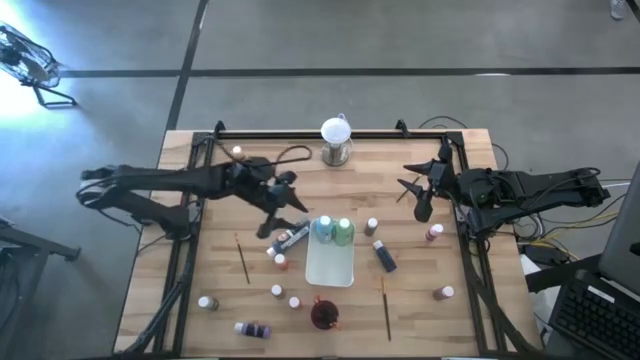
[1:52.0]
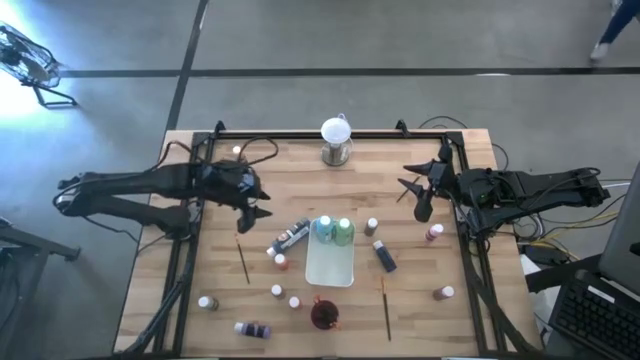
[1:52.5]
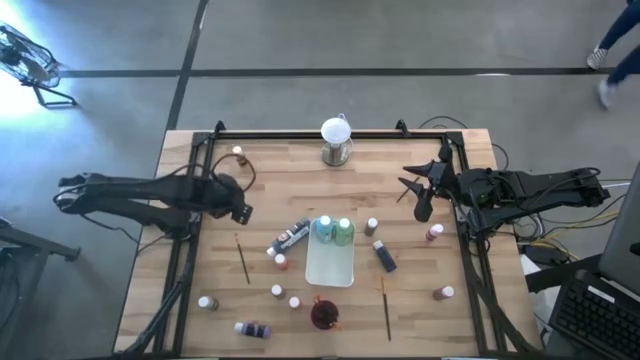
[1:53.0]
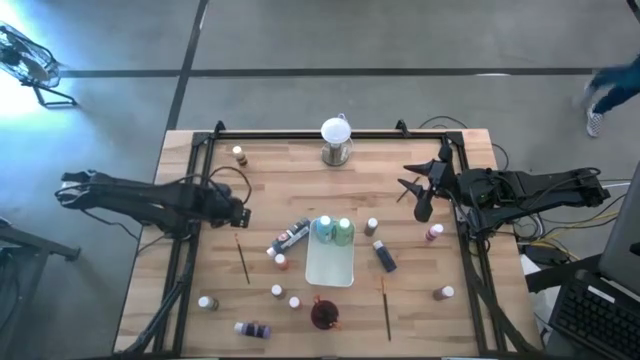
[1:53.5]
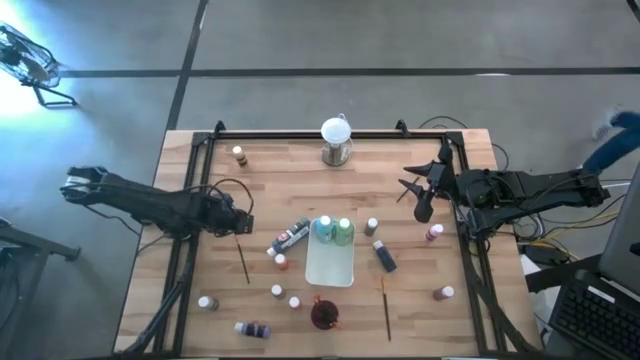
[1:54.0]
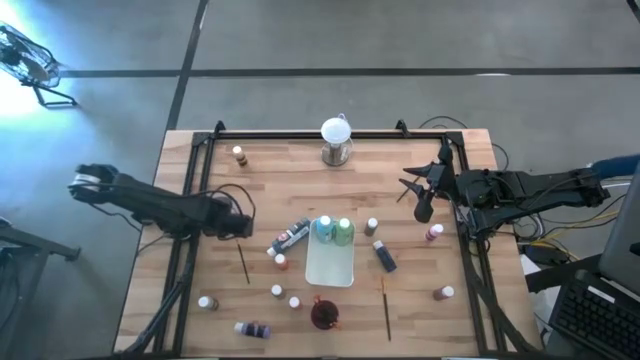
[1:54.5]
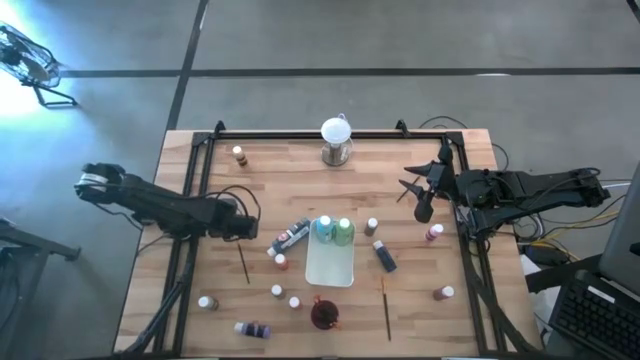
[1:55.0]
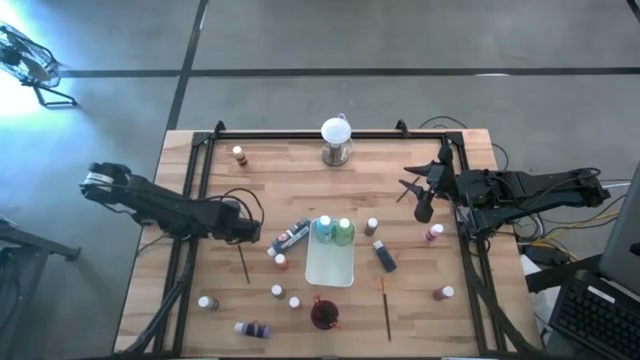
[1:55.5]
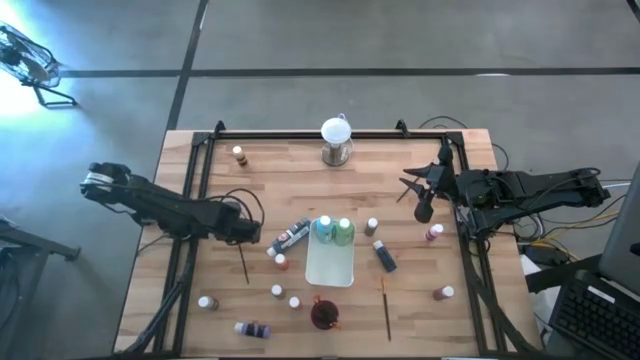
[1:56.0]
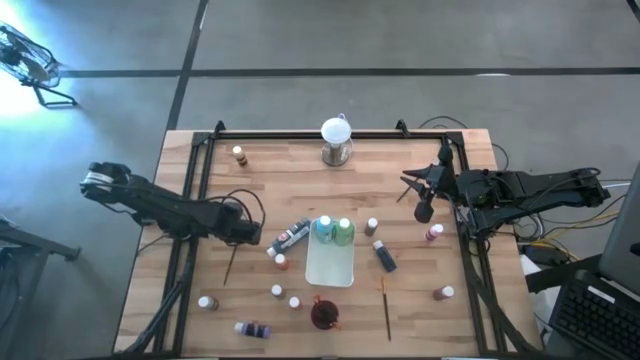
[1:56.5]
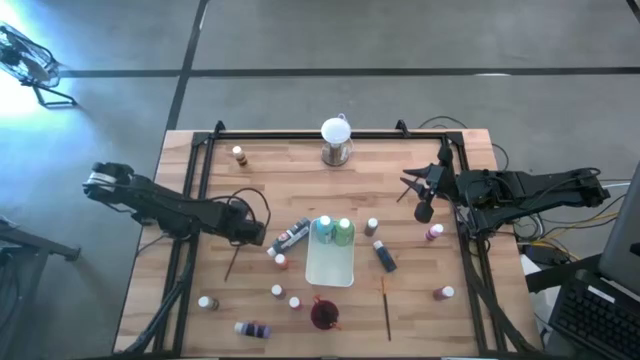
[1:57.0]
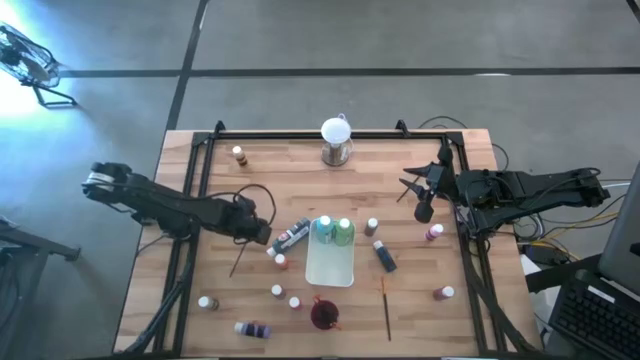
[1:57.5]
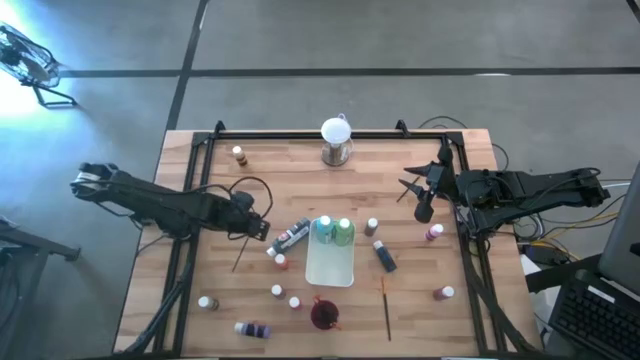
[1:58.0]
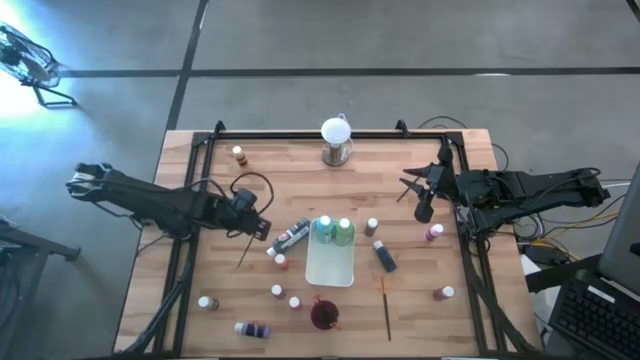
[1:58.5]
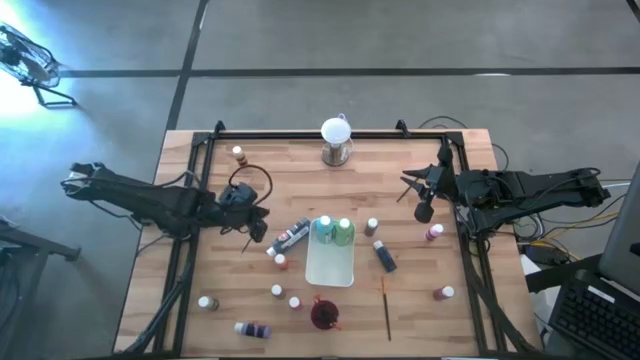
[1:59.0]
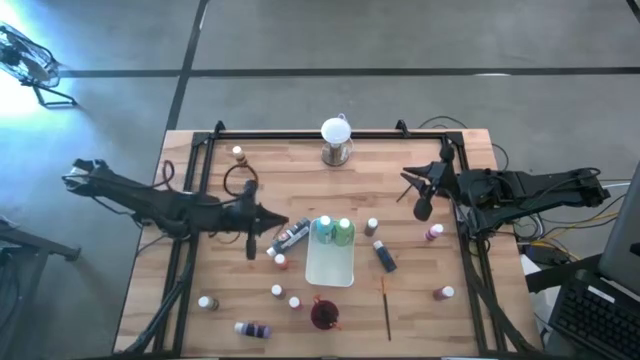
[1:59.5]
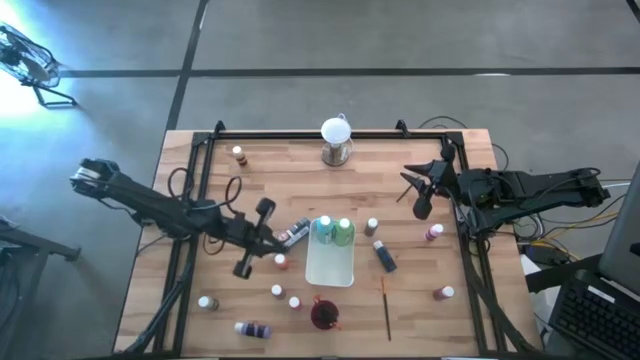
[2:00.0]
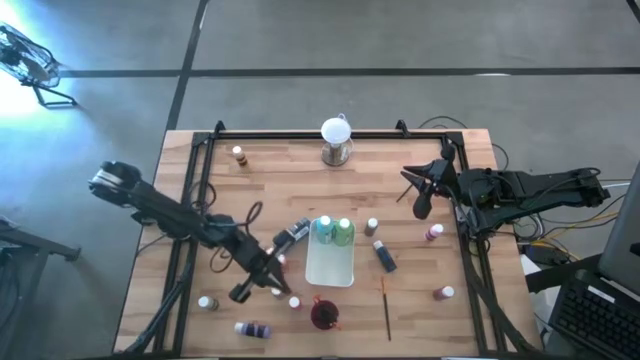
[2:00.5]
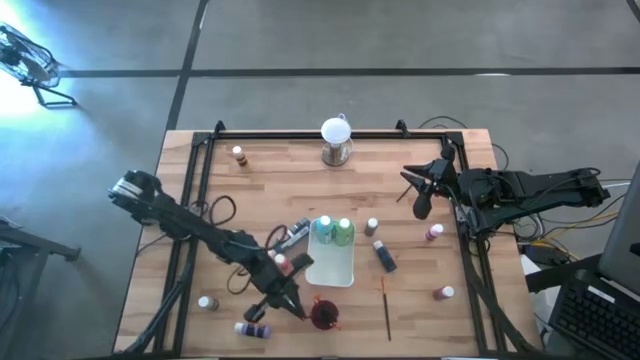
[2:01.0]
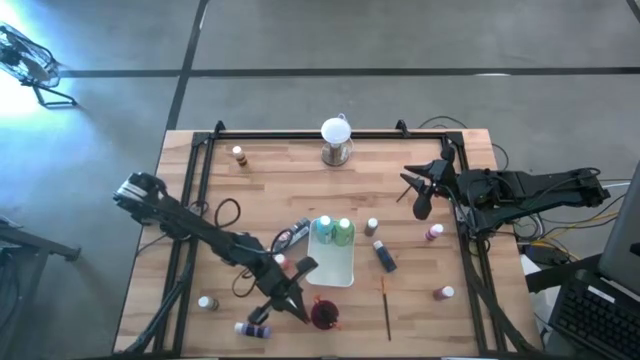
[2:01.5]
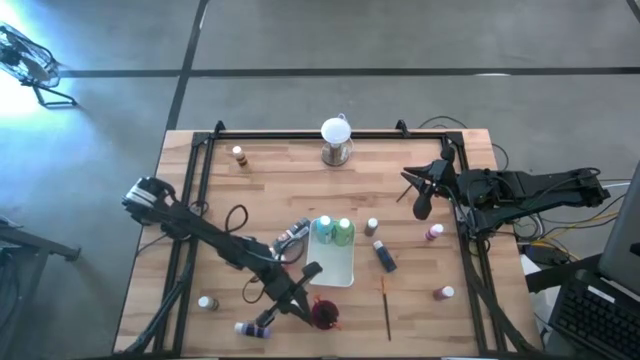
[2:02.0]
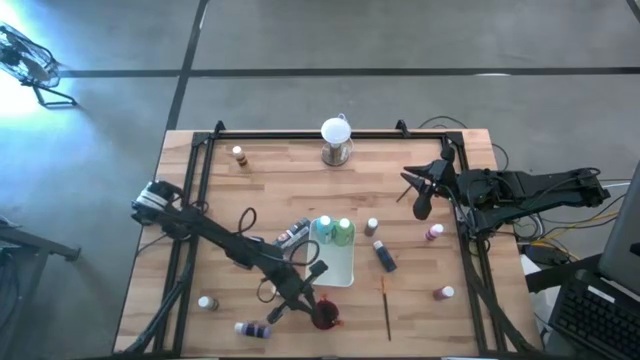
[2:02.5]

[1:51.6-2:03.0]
Task: Pick & Place Paint Supplies
Put the gold paint brush into the red cup

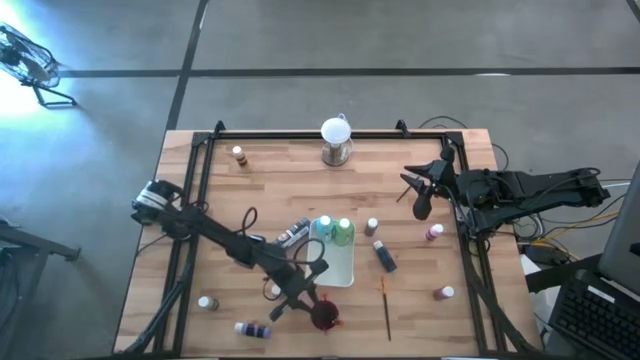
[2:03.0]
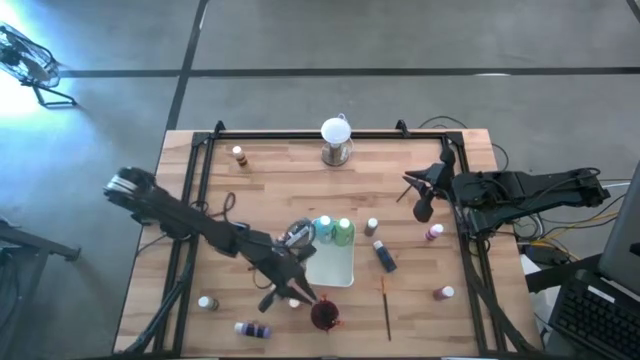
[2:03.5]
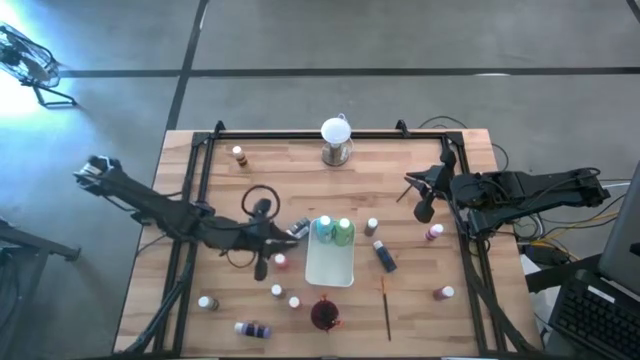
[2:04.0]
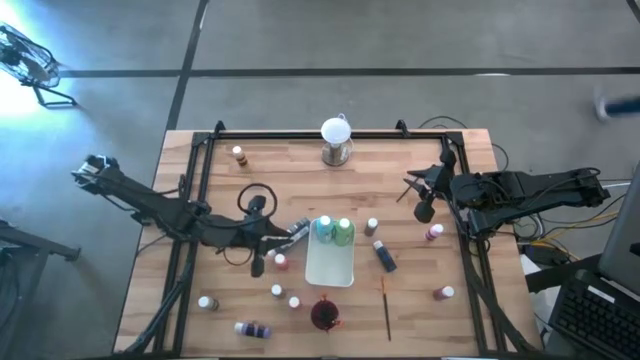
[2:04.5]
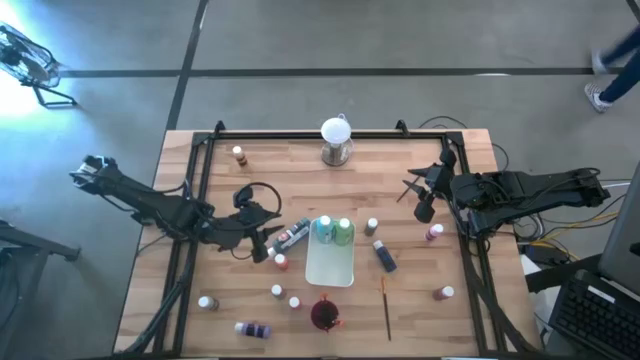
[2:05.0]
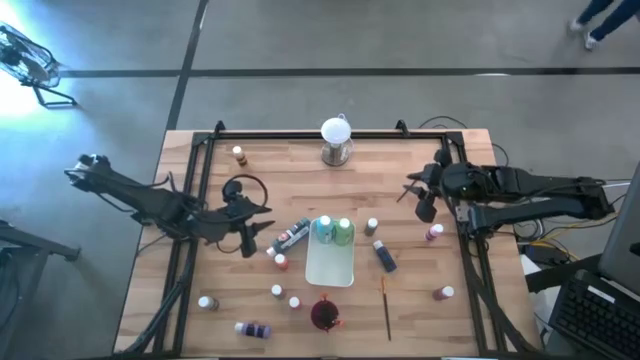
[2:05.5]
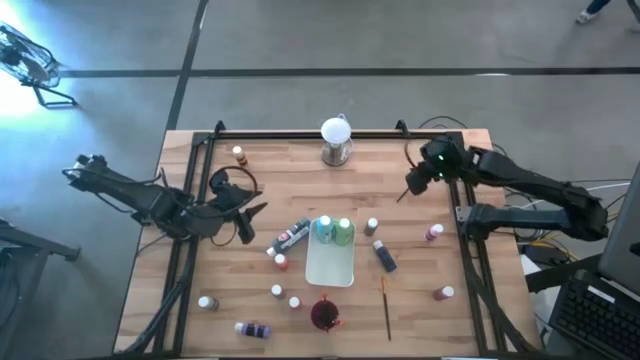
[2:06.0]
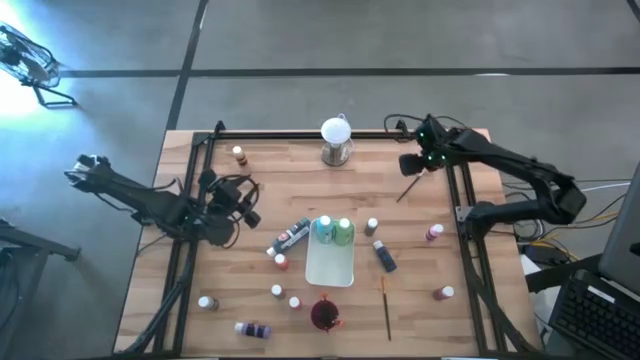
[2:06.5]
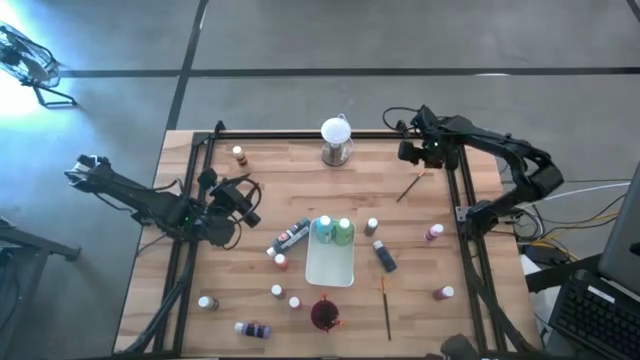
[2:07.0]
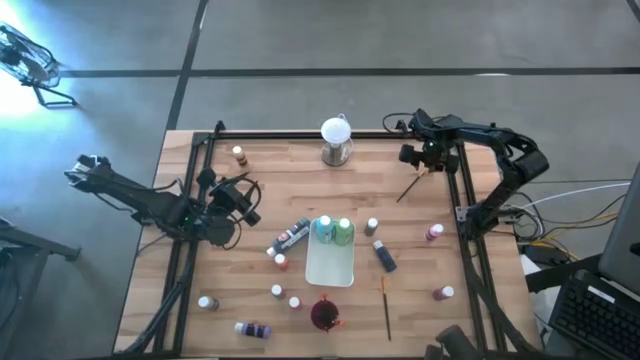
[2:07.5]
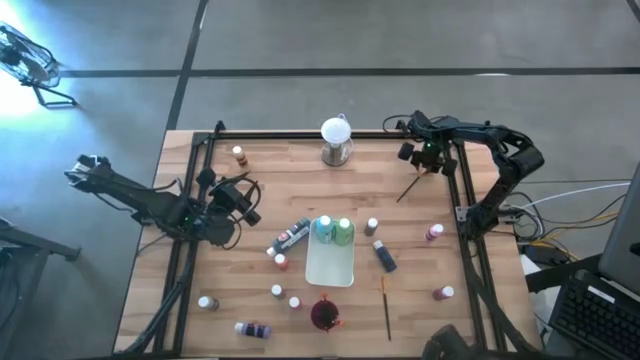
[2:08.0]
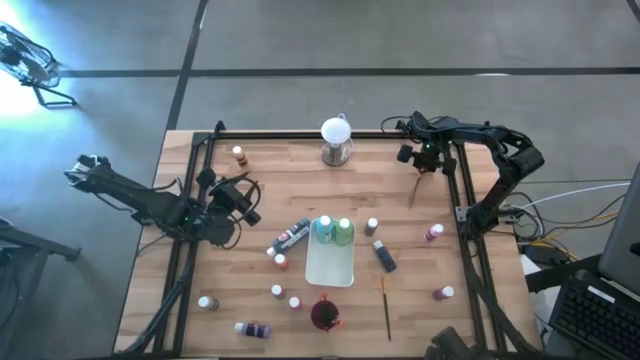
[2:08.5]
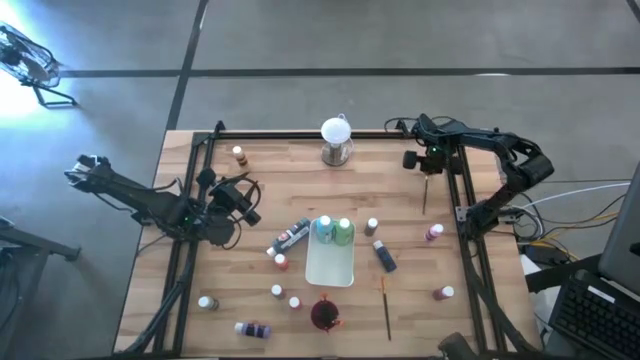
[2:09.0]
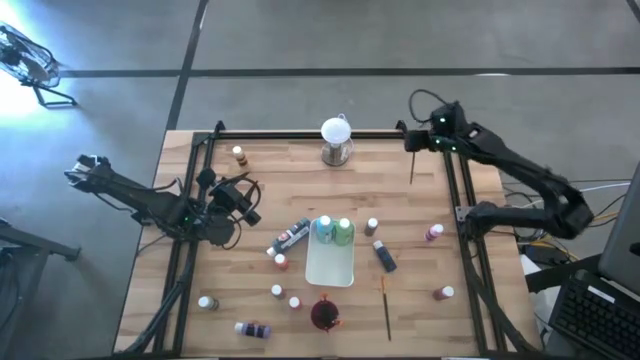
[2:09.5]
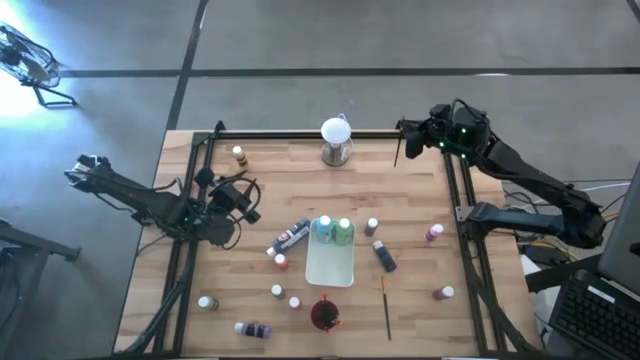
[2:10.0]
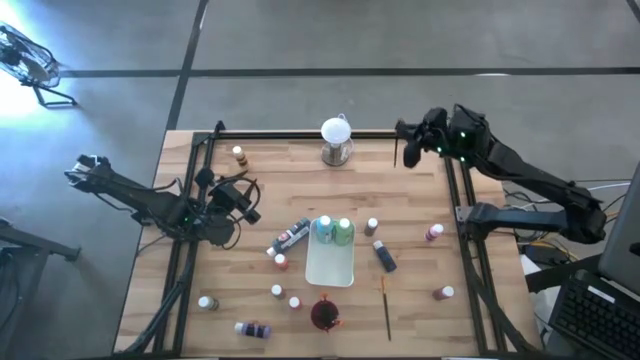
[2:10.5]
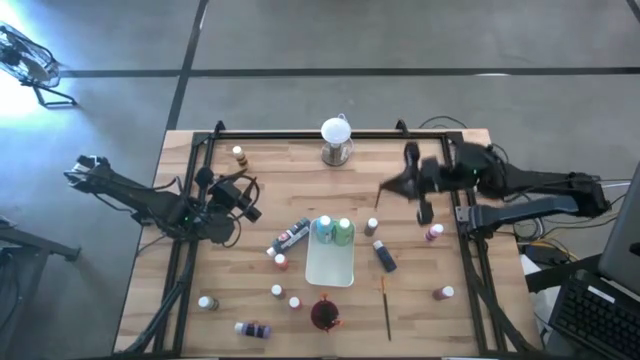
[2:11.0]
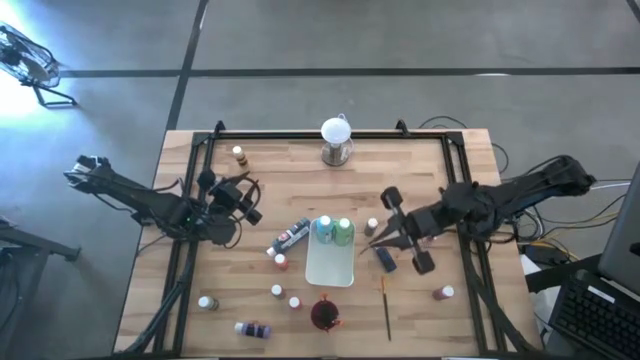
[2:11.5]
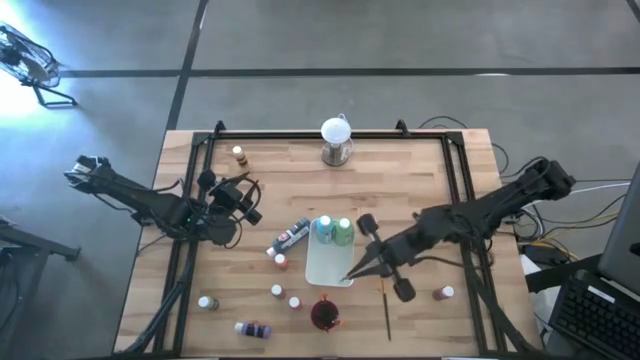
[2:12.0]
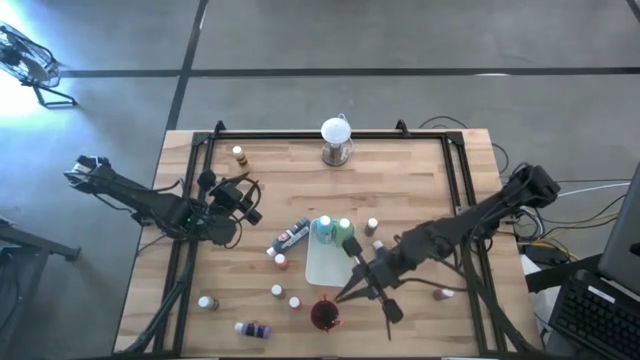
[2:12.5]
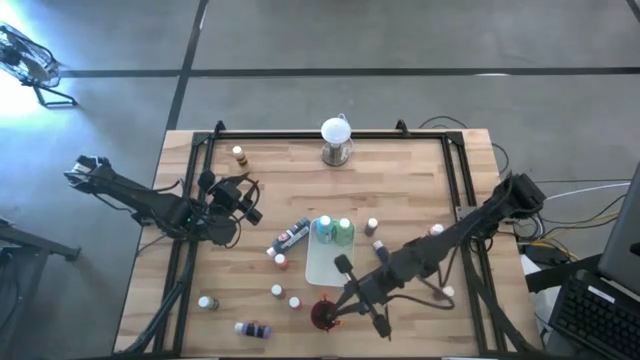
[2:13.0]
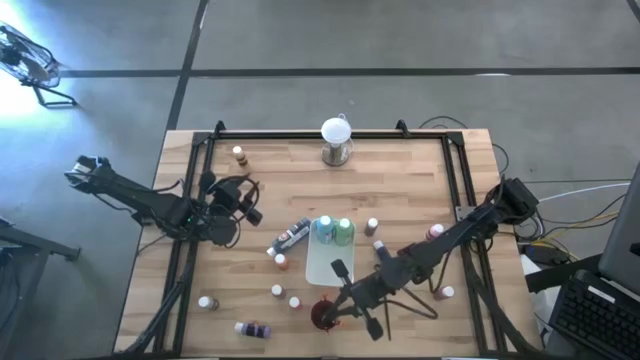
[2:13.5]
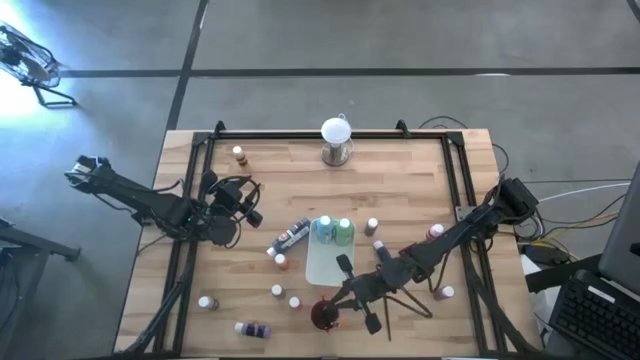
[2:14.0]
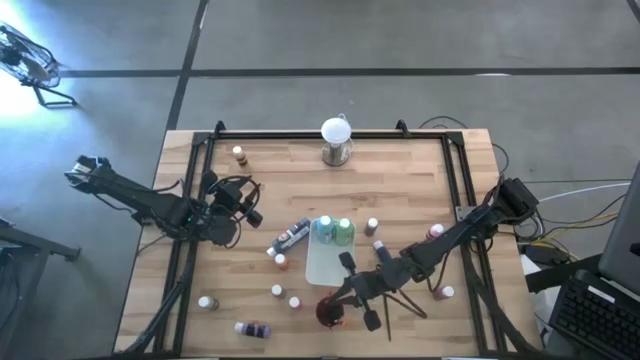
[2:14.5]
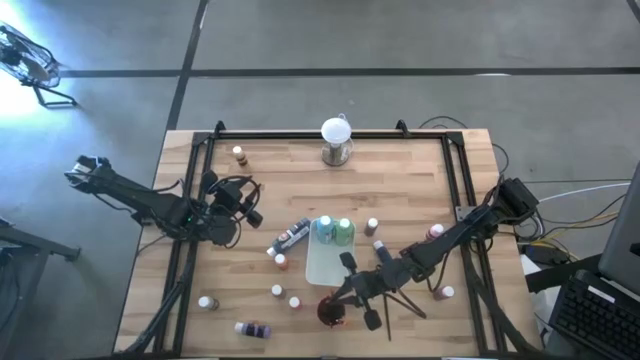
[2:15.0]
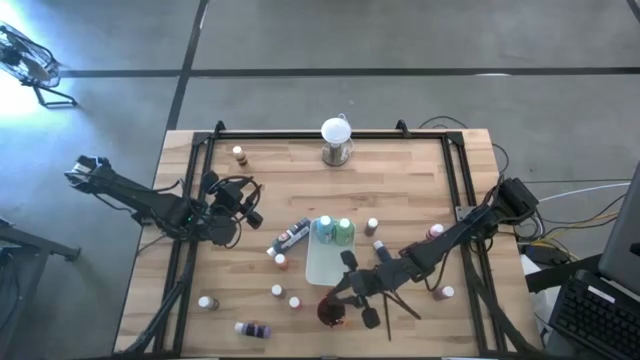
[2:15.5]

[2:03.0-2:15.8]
Put the gold paint brush into the red cup
